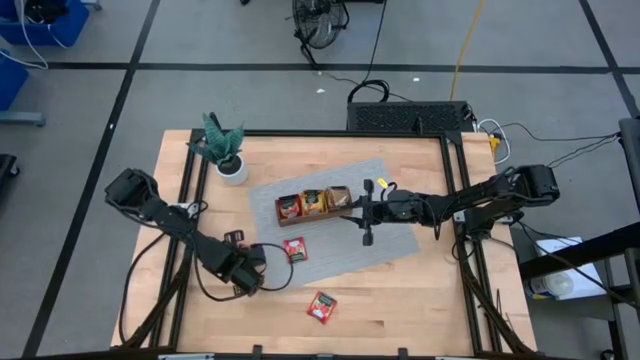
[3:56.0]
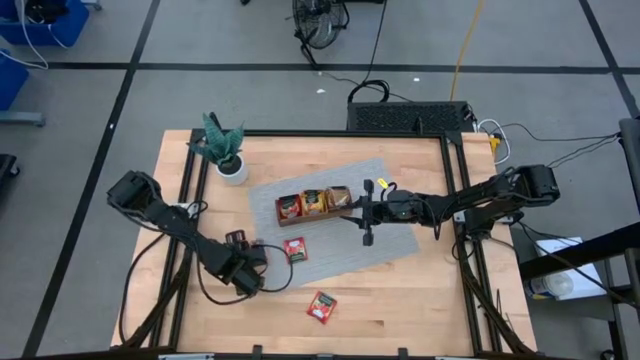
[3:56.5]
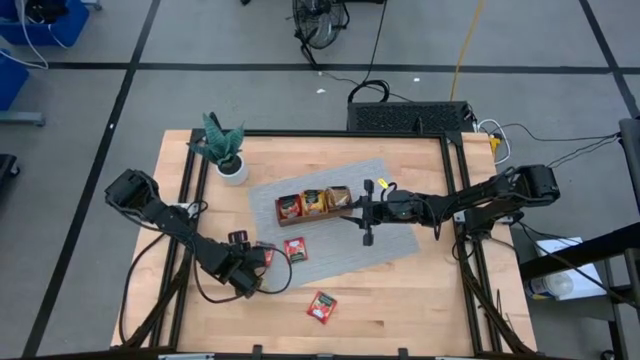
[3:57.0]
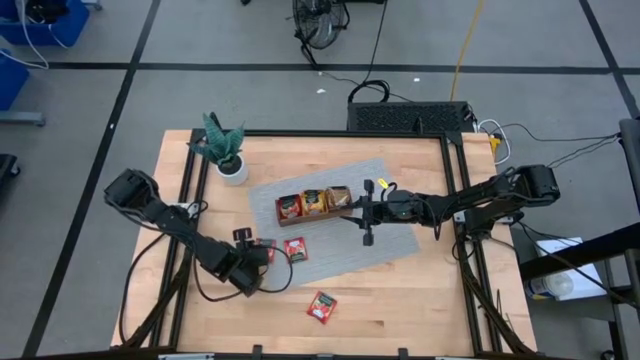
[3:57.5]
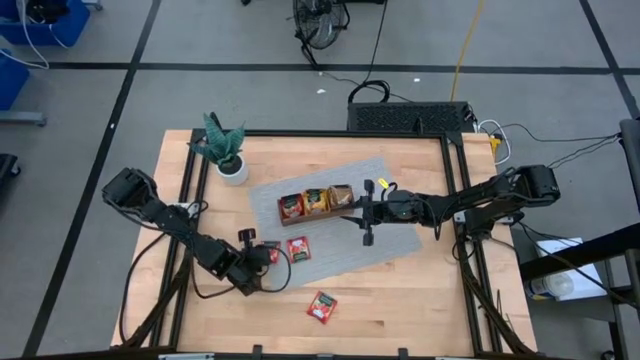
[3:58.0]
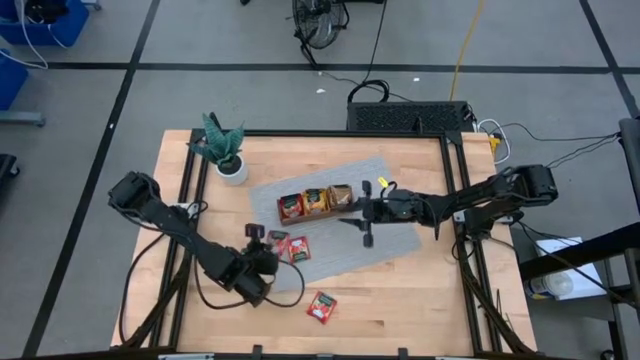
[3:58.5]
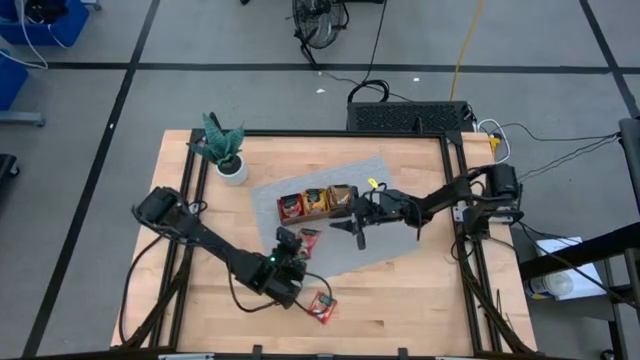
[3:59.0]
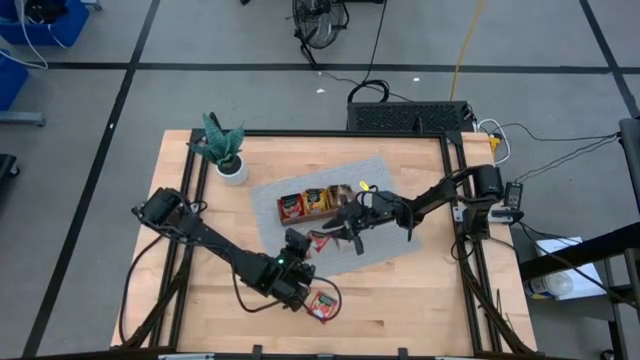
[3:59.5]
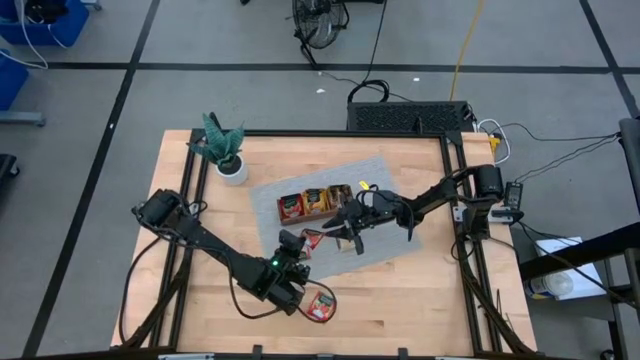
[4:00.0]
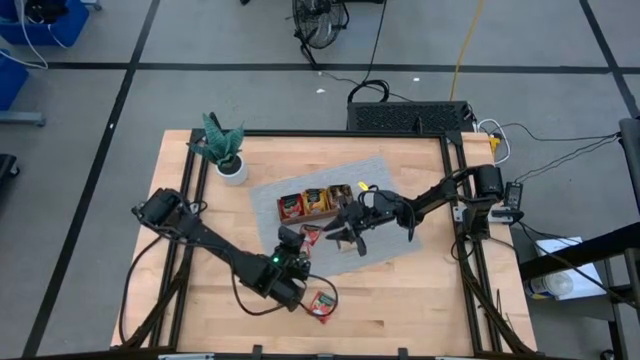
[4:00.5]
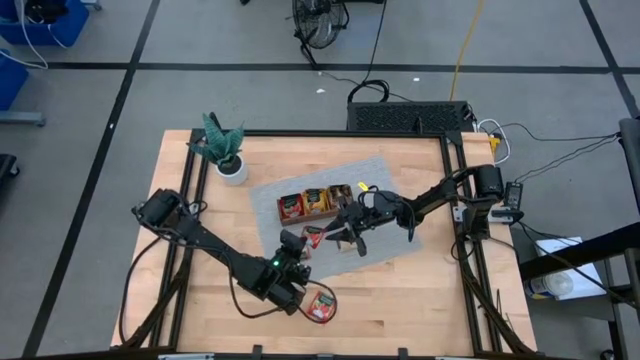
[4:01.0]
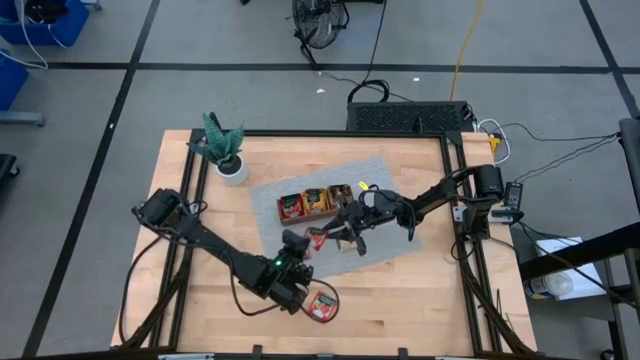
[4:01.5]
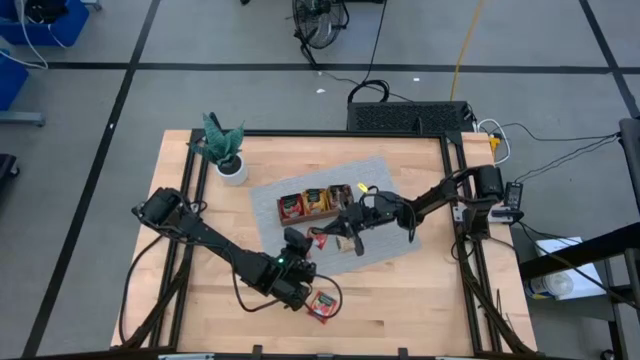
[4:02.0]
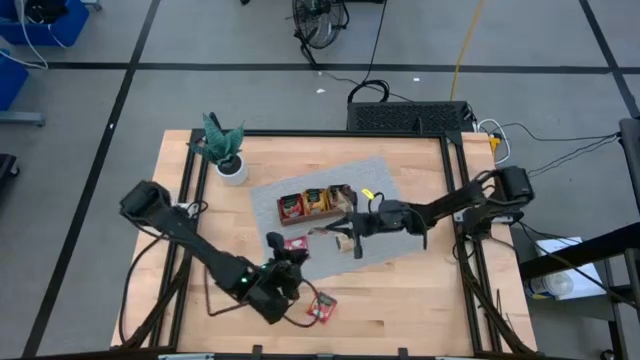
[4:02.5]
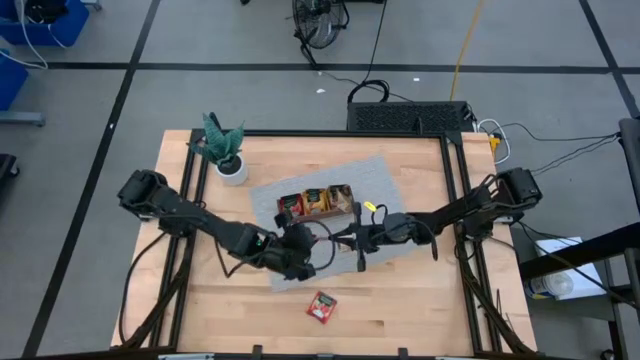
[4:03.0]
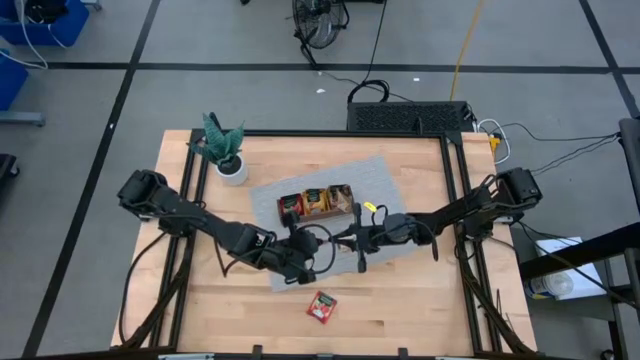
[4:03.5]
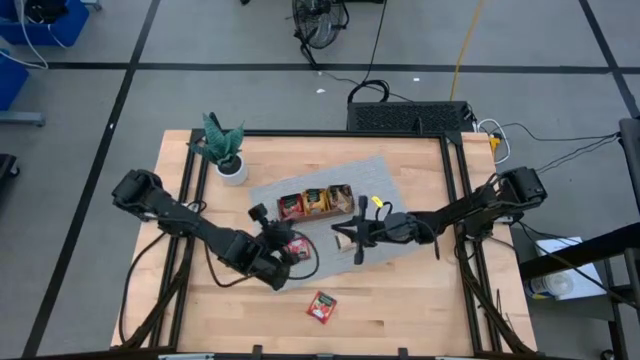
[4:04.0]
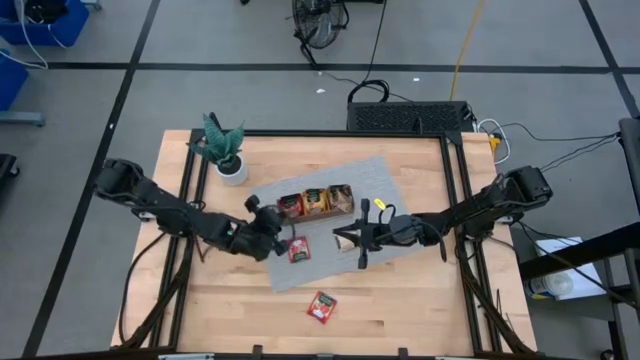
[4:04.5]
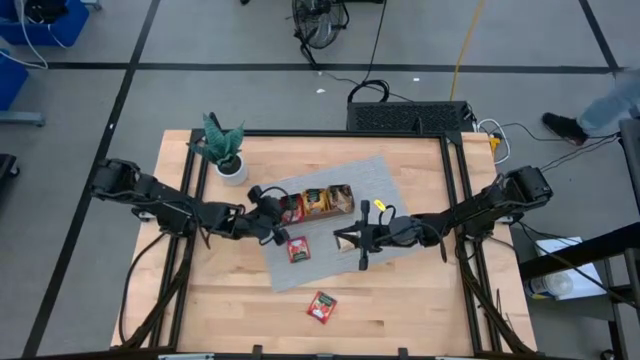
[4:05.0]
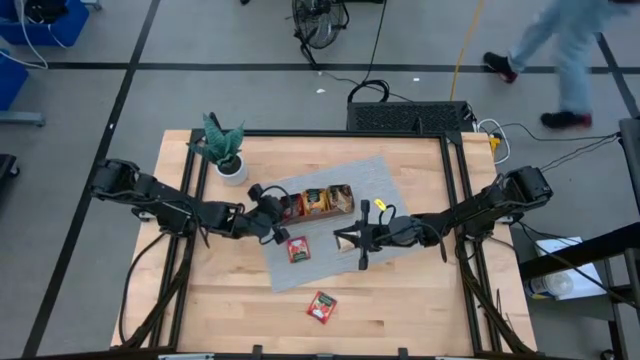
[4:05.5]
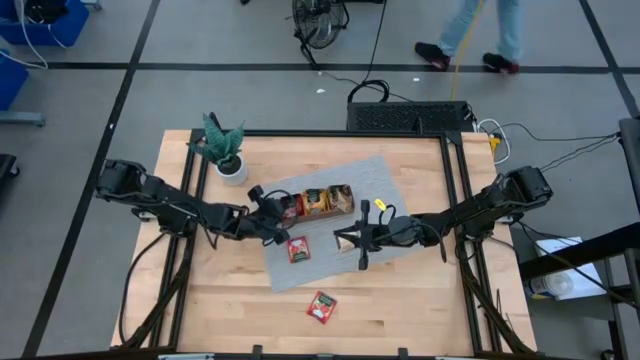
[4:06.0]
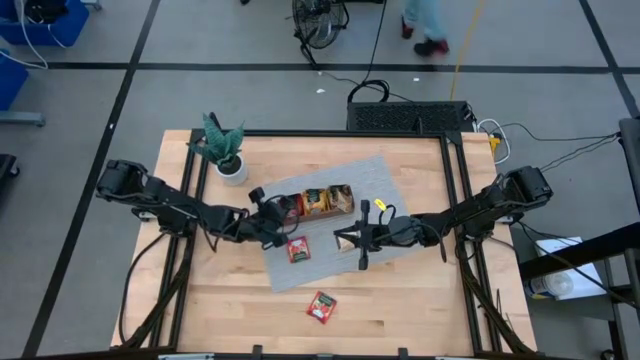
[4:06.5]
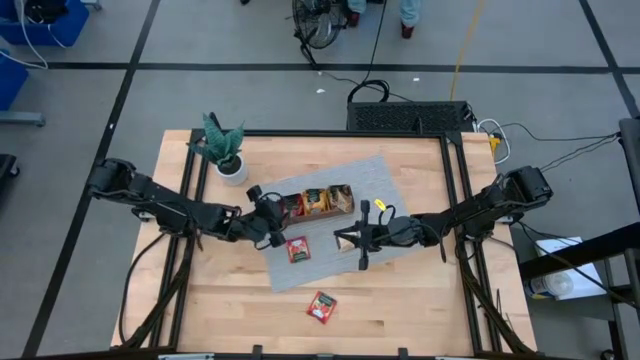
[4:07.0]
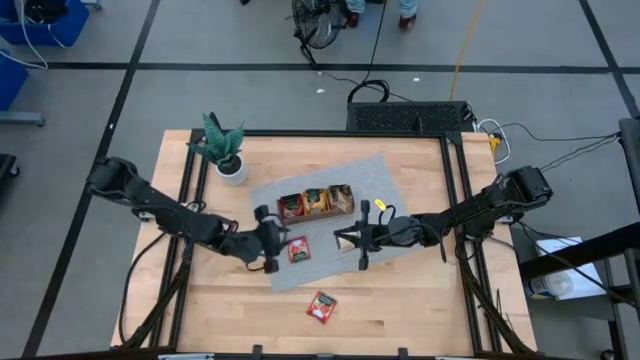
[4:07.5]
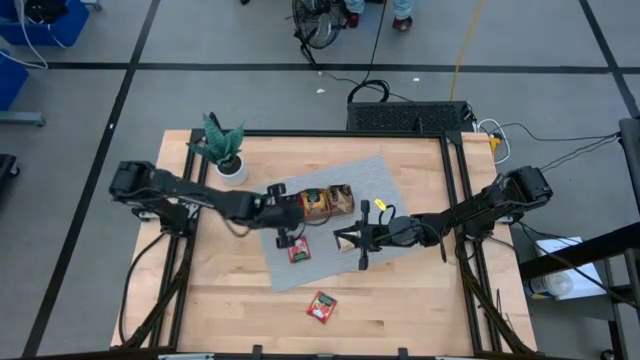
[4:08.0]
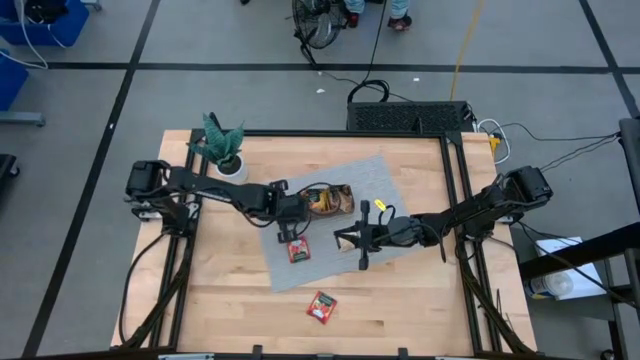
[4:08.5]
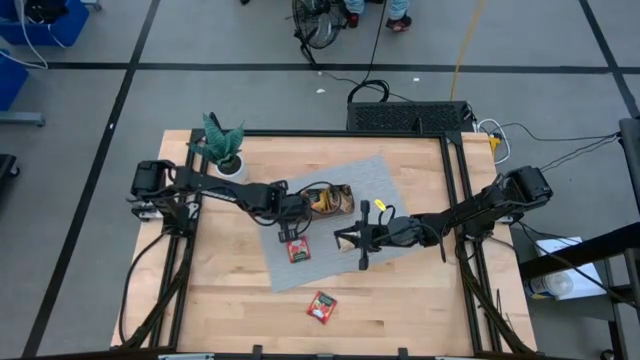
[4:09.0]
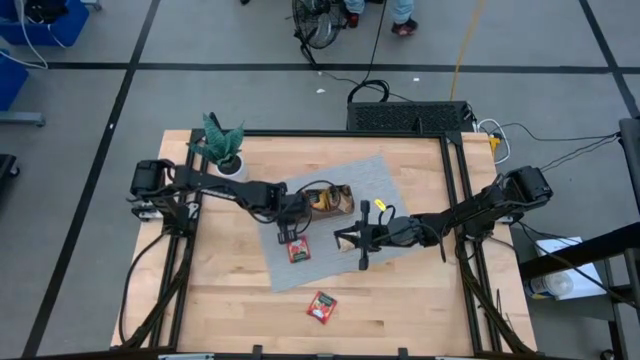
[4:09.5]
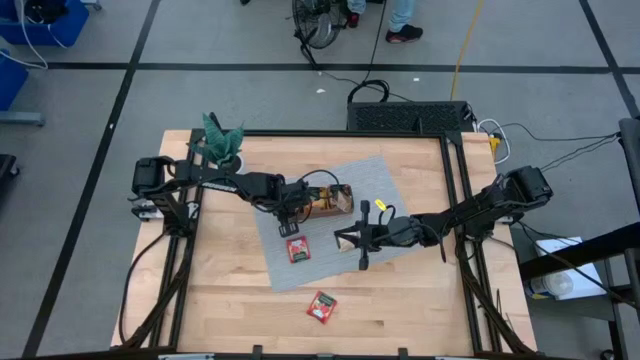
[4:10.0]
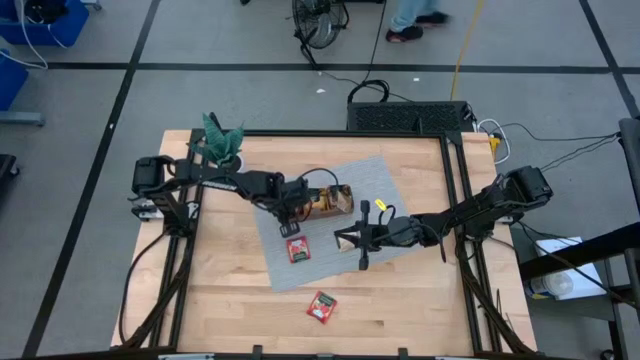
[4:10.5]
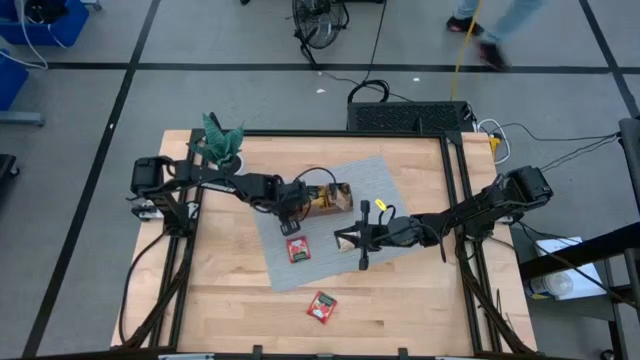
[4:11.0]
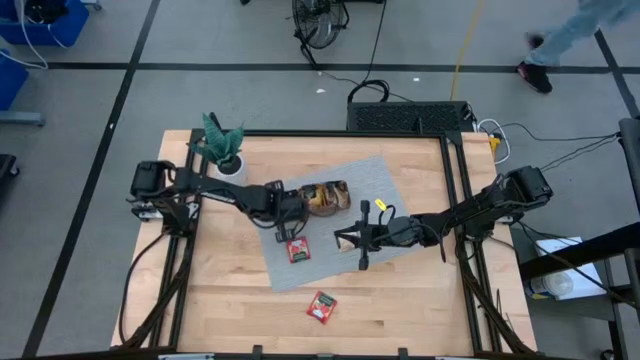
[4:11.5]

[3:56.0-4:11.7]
Task: Pick & Place Tea
Put the top right red tea into the left part of the wooden organizer

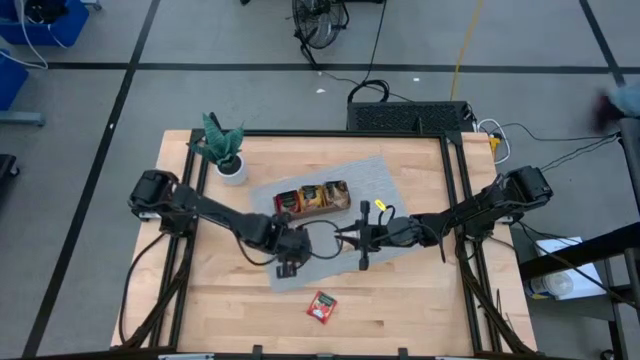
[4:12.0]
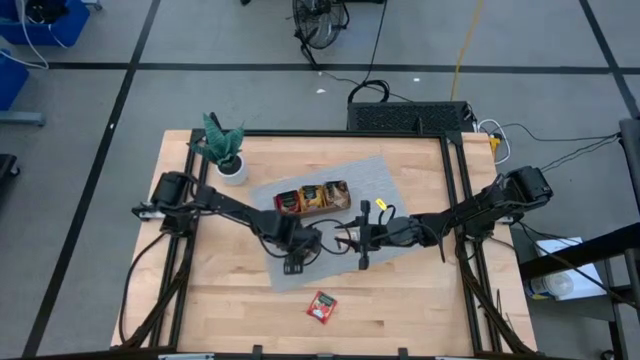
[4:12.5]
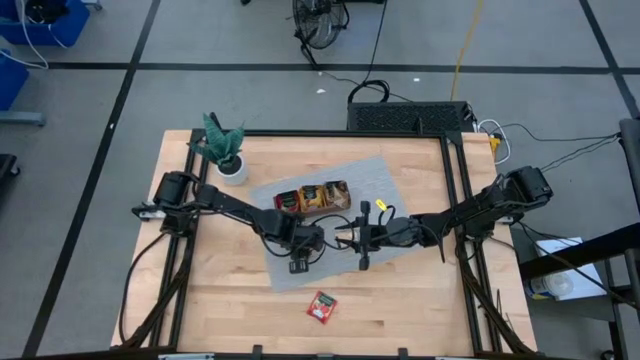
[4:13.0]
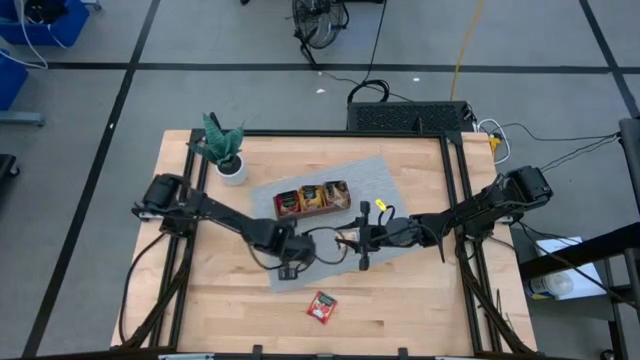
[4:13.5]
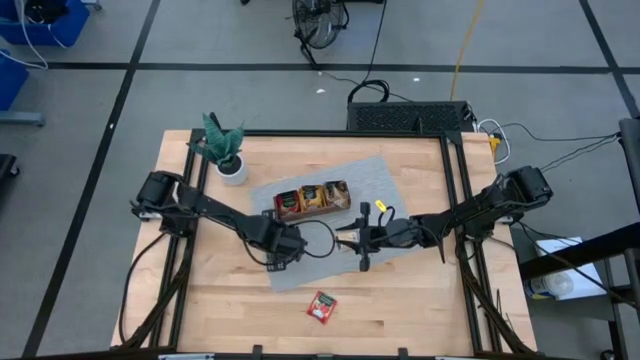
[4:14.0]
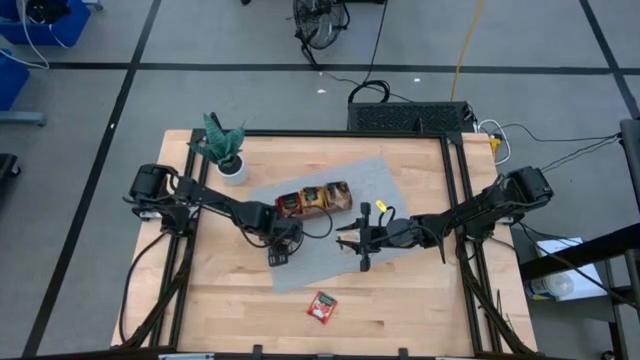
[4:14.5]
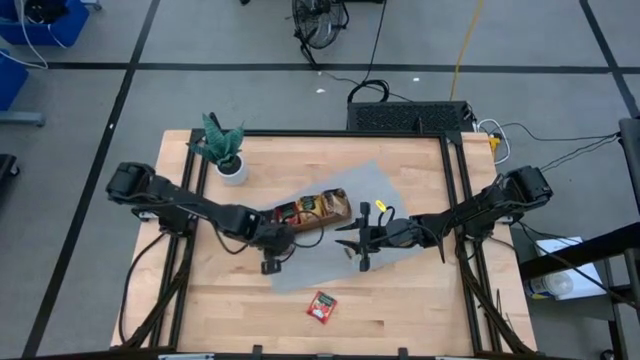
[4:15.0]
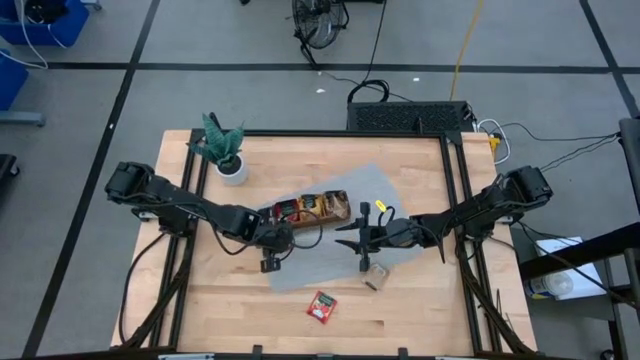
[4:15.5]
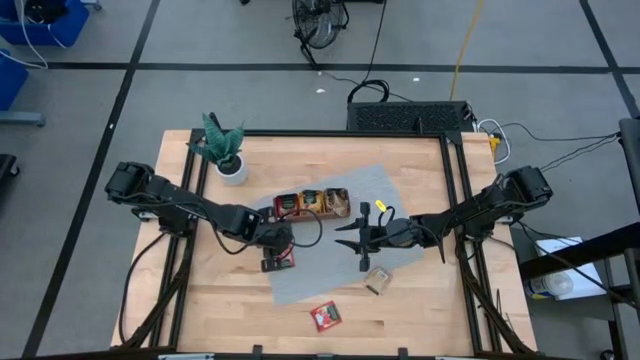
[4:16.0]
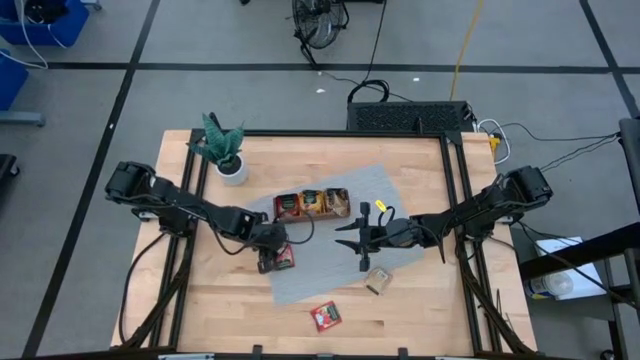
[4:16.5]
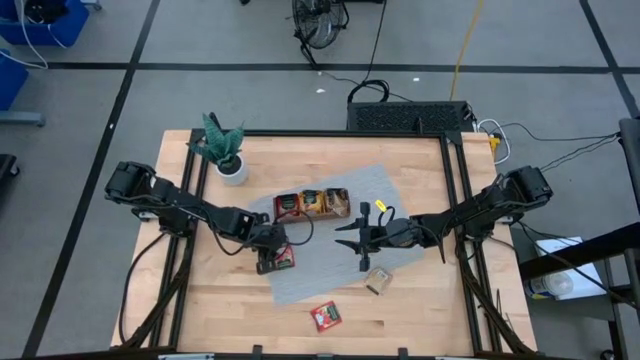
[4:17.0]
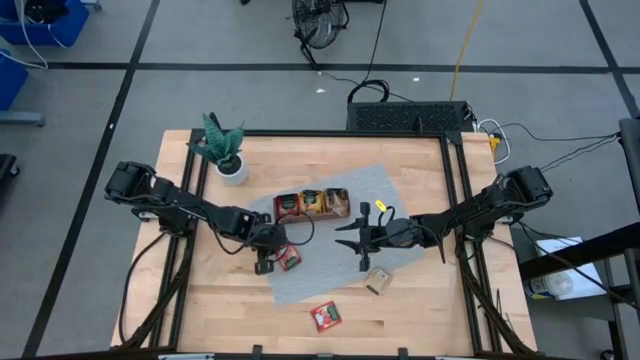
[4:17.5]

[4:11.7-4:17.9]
Put the top red tea into the left part of the wooden organizer
